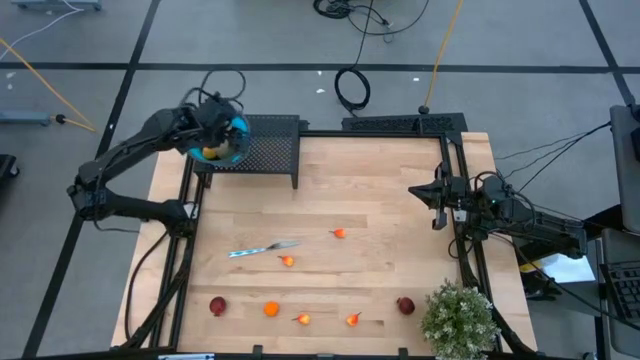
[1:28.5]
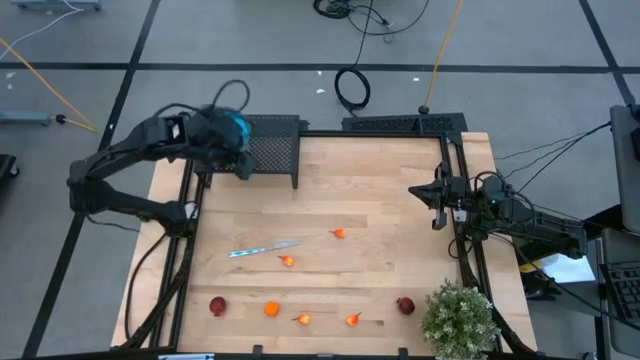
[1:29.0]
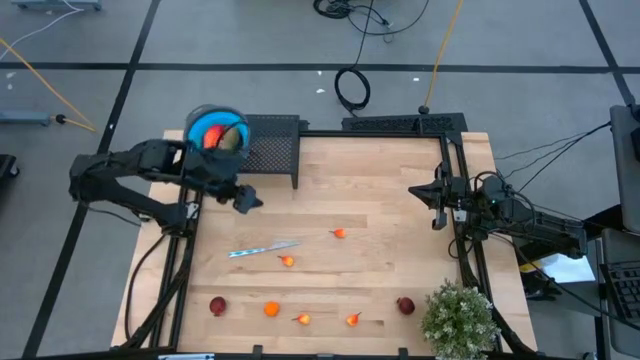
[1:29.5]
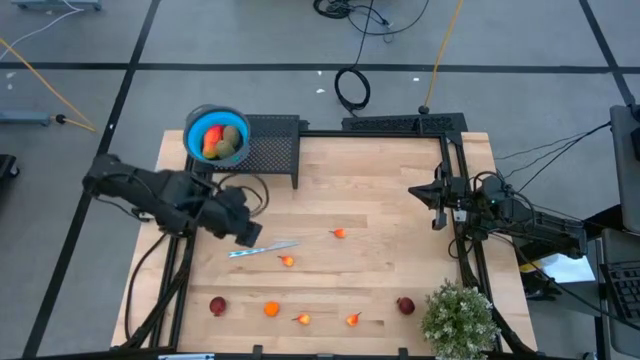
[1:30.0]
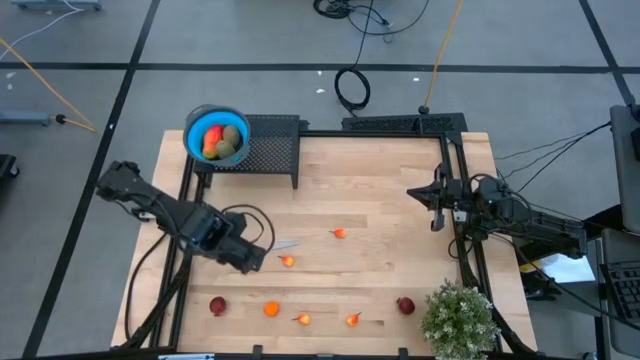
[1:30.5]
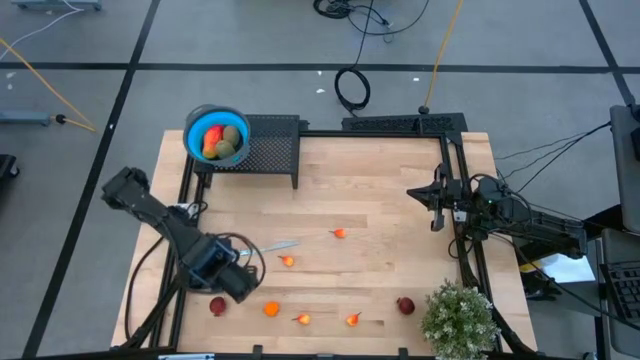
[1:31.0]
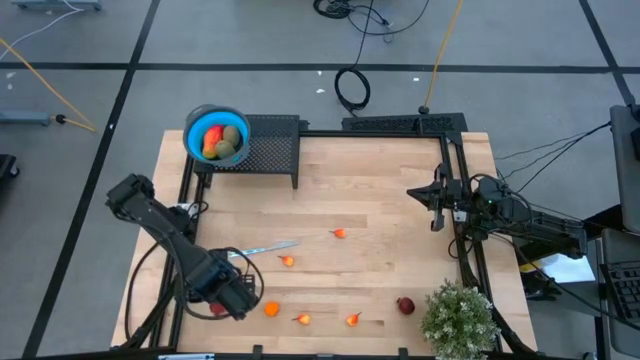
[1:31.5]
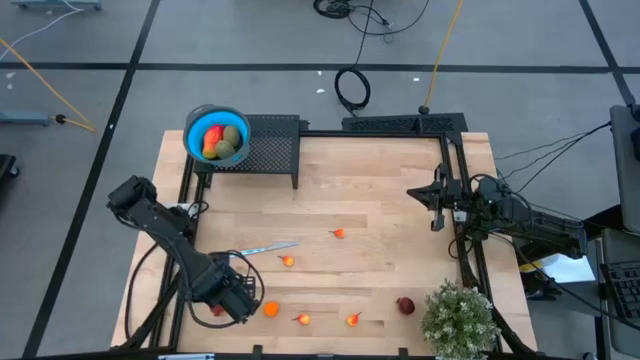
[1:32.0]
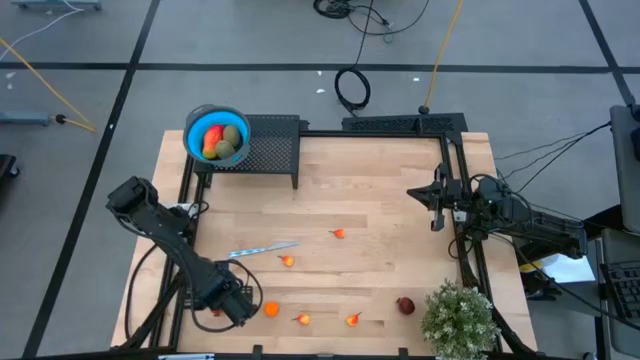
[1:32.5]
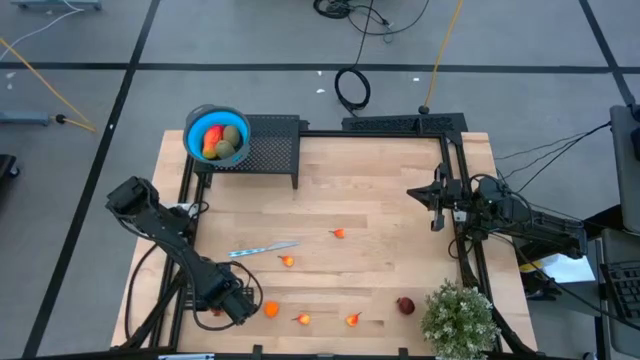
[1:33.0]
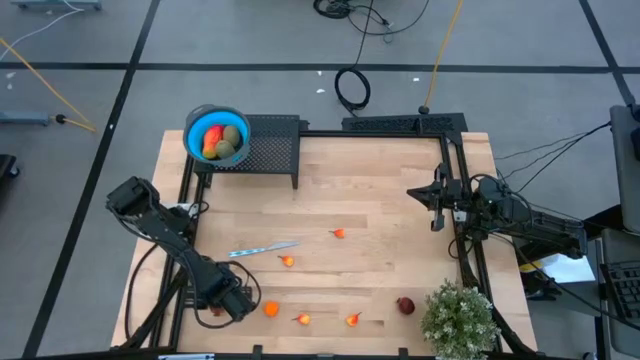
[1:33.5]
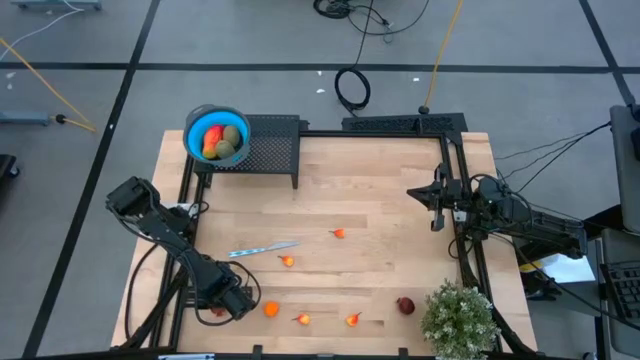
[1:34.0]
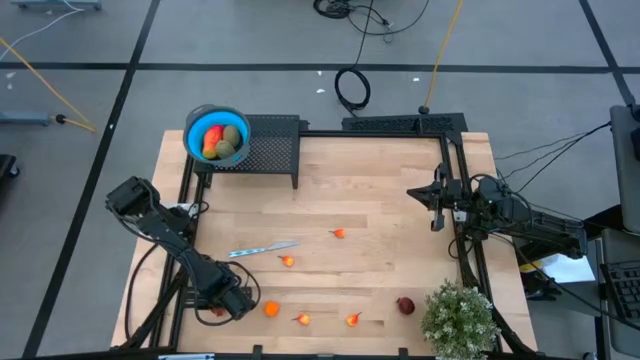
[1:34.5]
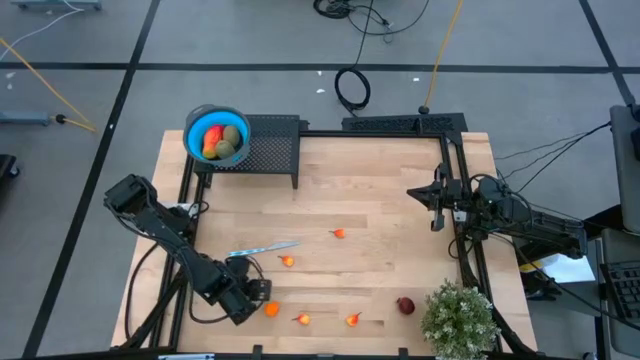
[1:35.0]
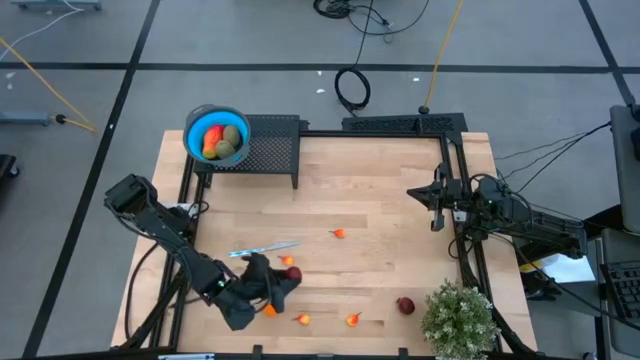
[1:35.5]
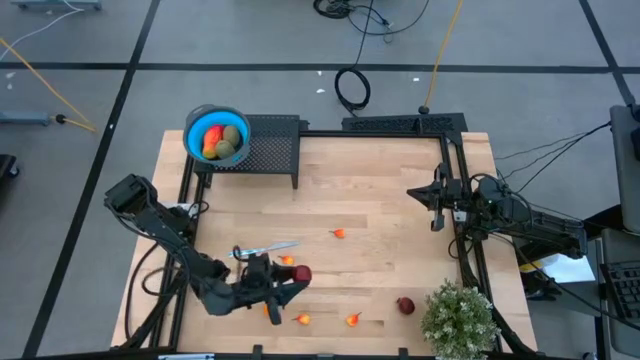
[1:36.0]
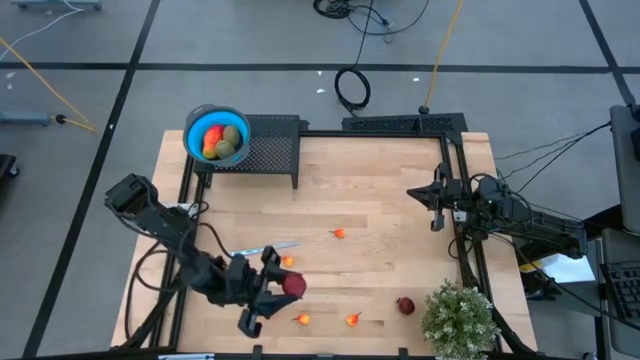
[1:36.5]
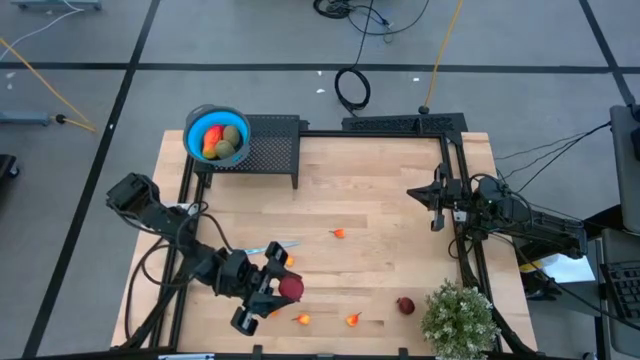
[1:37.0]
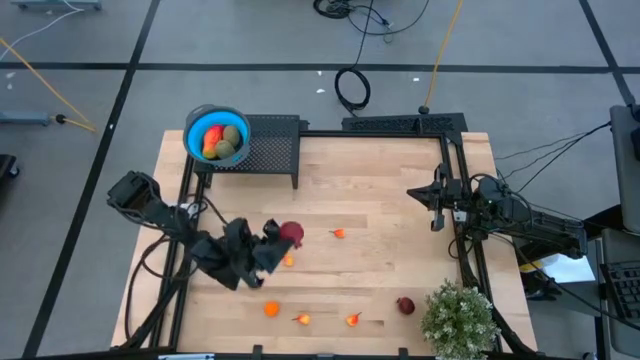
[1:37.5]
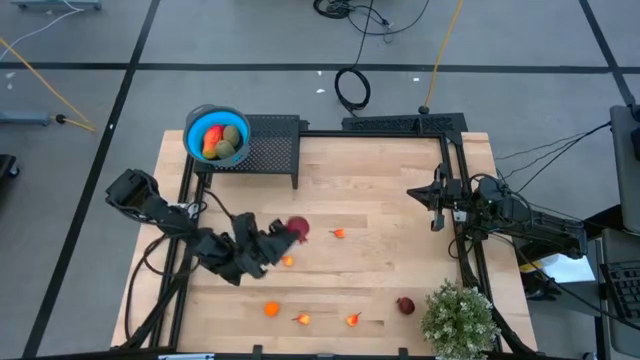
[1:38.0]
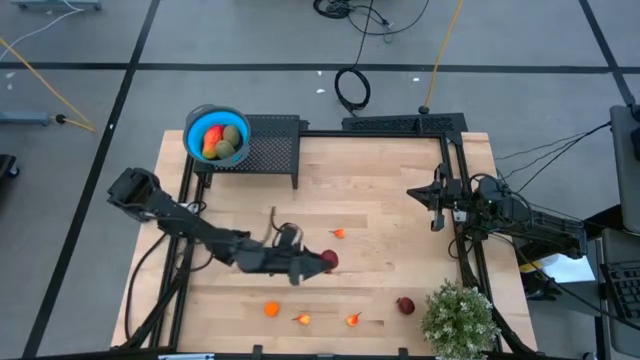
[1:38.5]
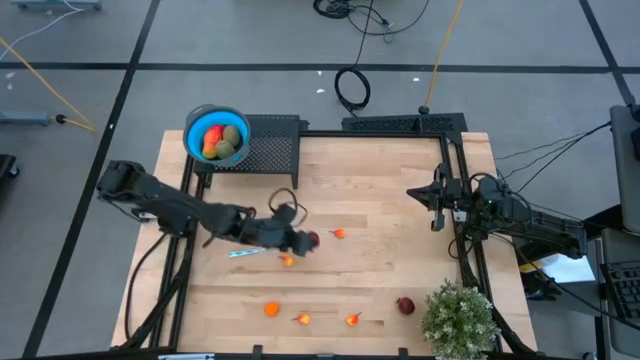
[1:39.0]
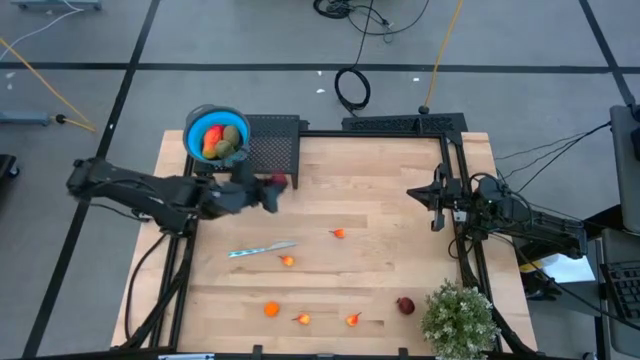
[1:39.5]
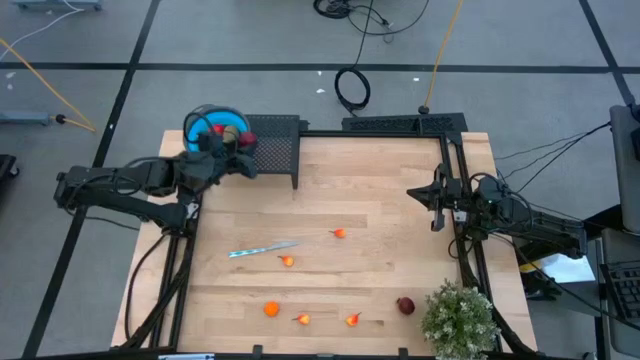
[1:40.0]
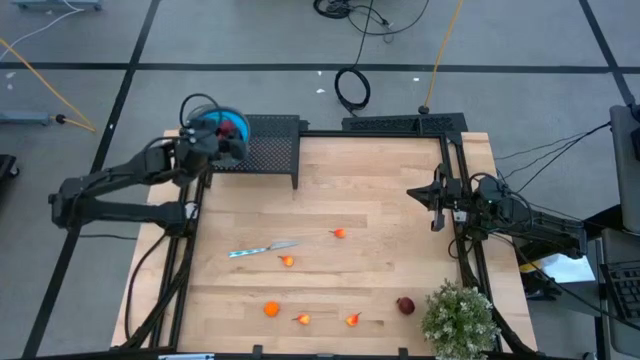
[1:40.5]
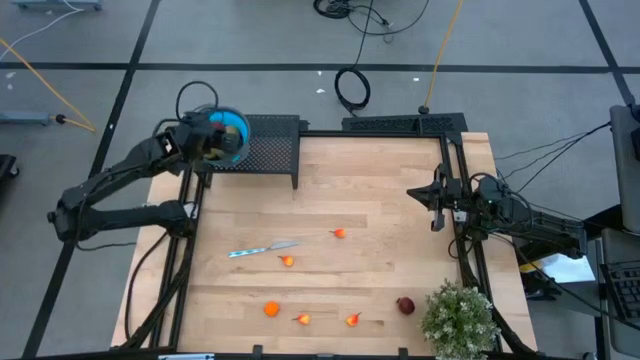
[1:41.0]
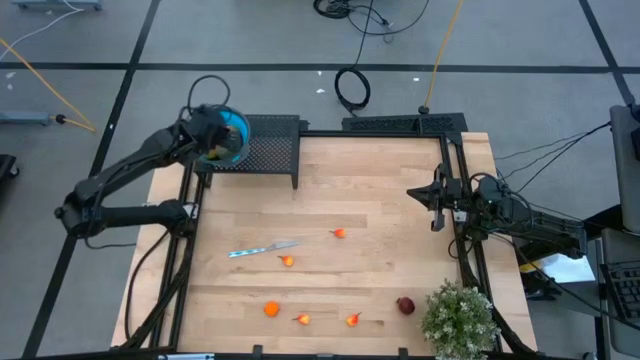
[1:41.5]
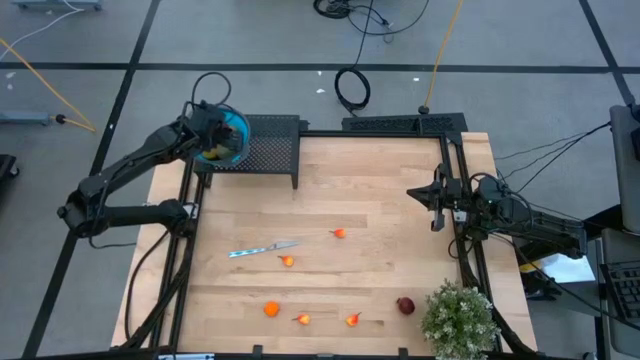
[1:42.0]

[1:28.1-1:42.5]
Task: Pick & Place Fruit
Put the pomegranate into the blue strainer bowl on the shelf

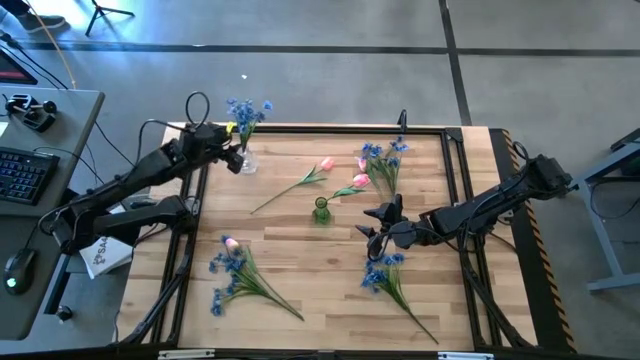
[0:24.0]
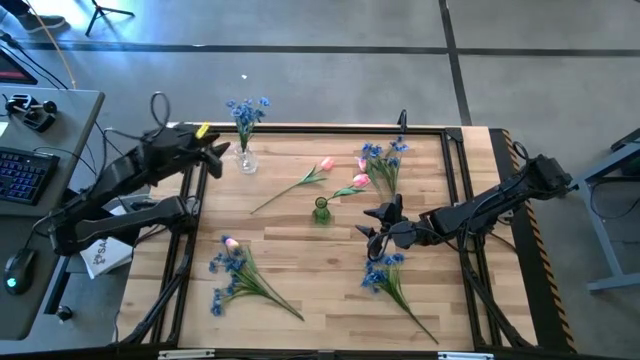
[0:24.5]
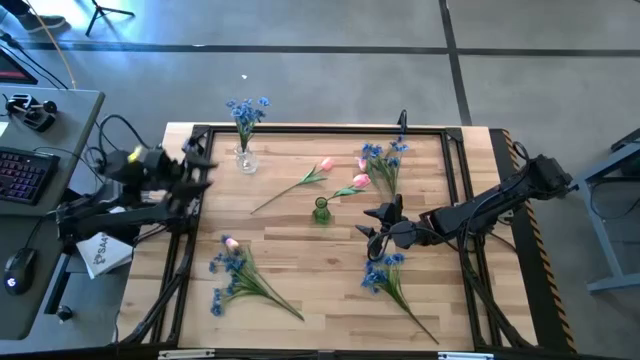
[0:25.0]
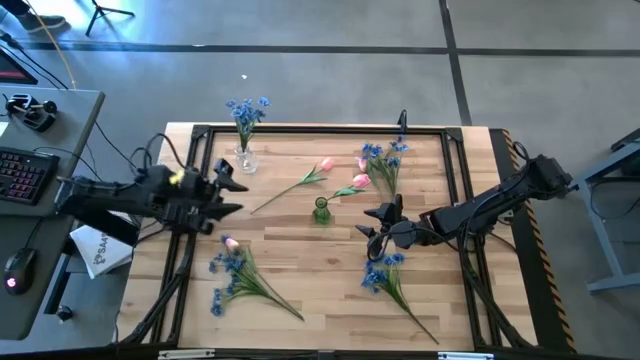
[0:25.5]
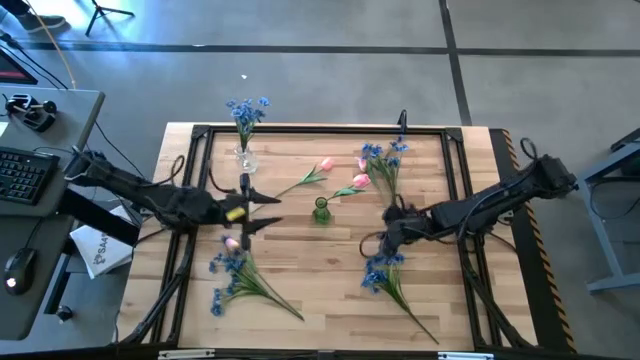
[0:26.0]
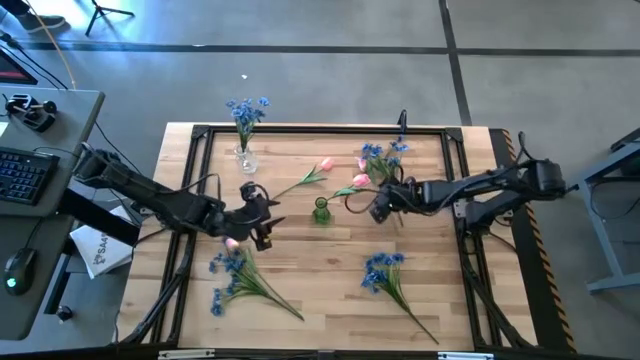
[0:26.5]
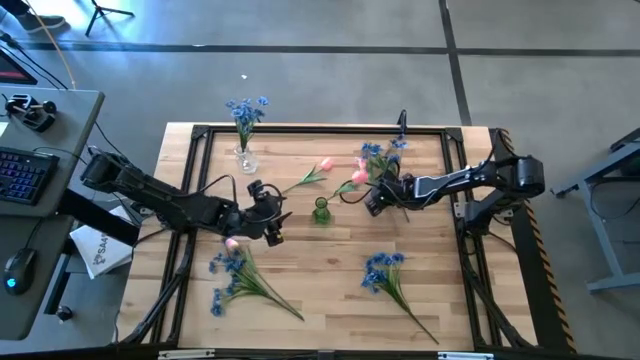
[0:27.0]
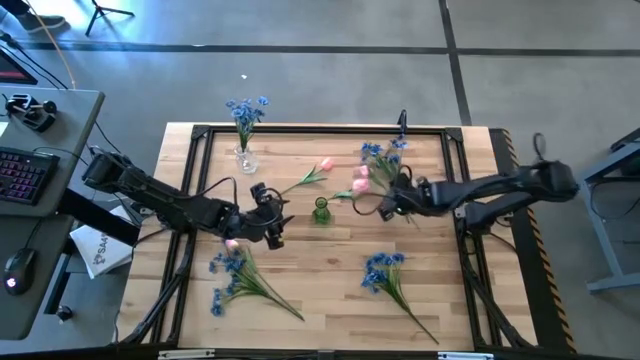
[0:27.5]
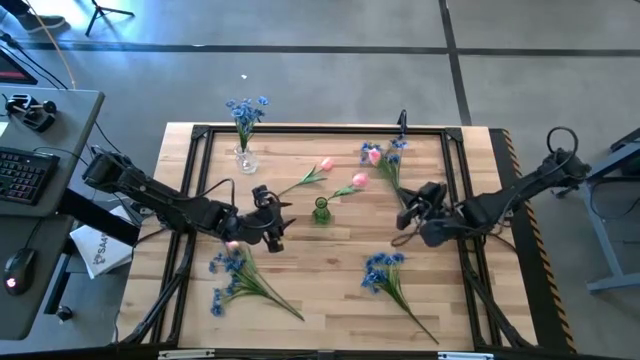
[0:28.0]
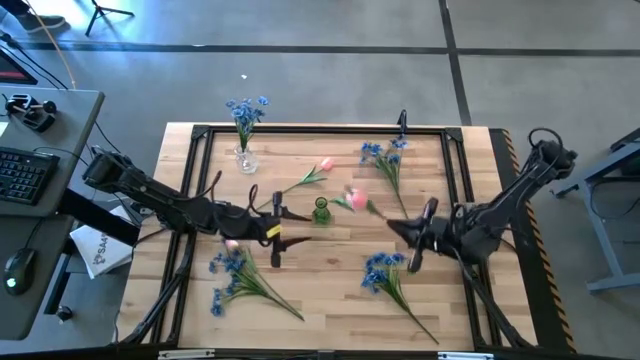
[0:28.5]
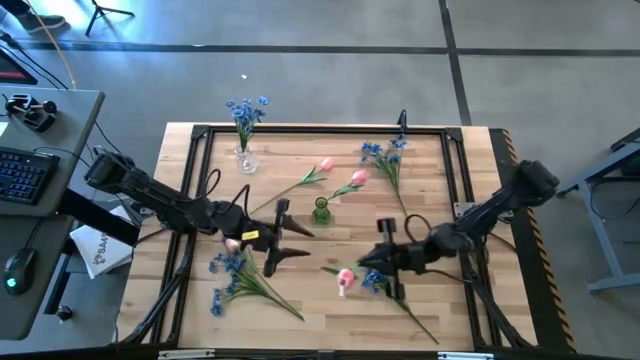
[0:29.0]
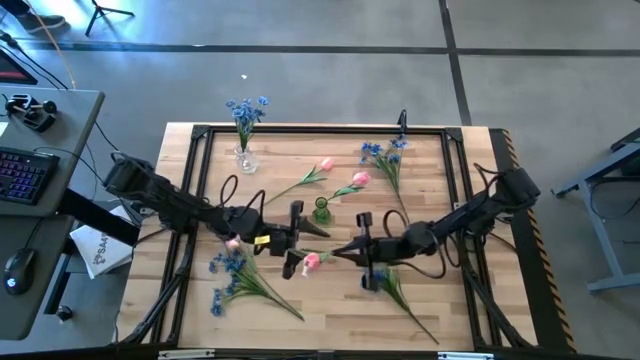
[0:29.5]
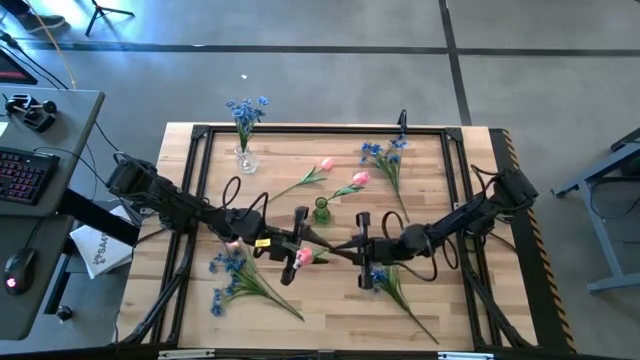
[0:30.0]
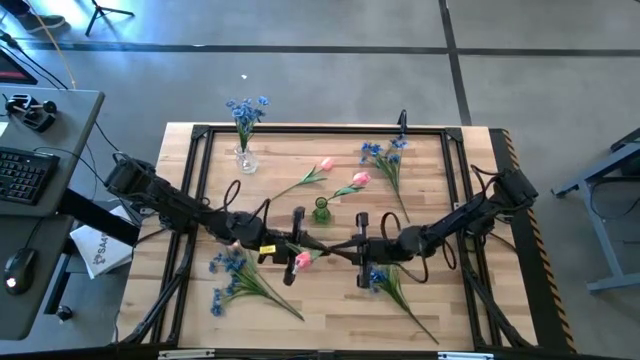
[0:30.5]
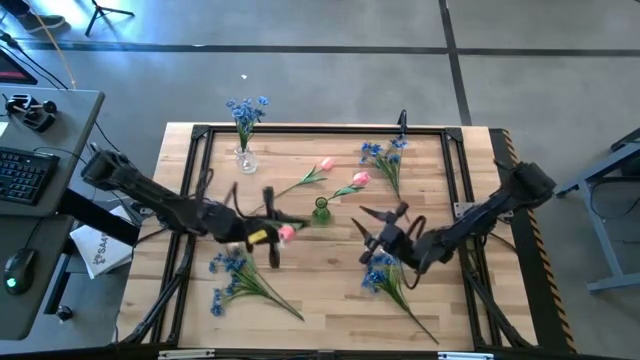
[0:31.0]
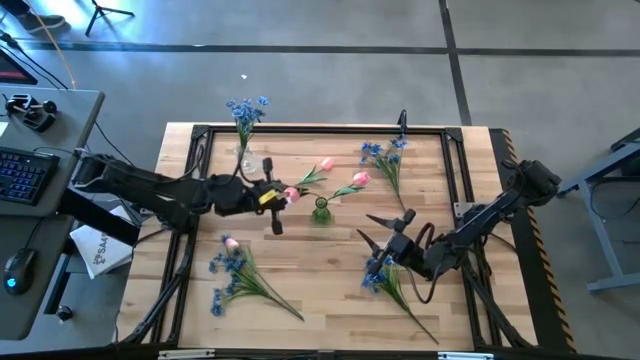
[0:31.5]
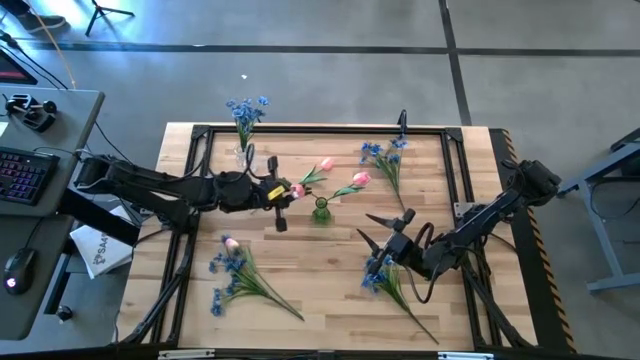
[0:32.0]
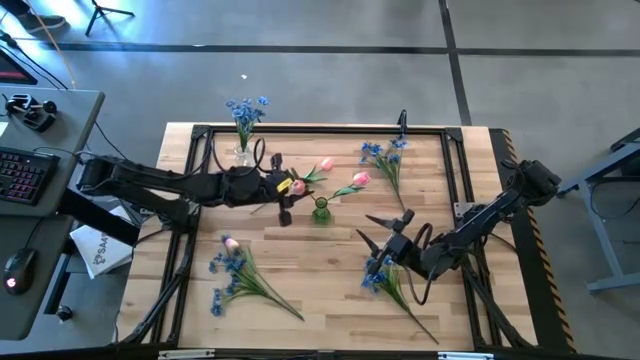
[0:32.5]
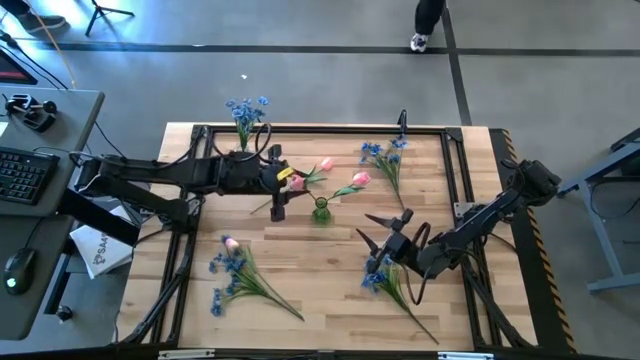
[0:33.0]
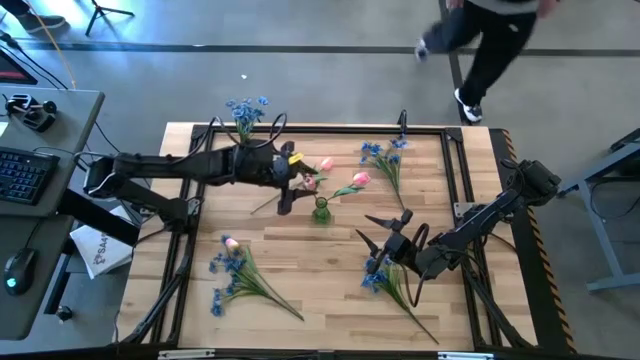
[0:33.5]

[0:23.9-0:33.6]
Task: Sort flowers into vase by color
Put the pink tulip into the green vase
